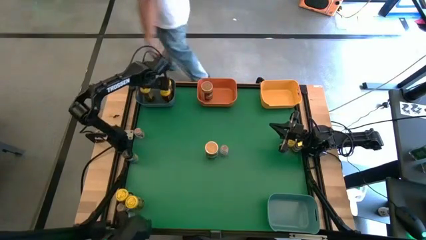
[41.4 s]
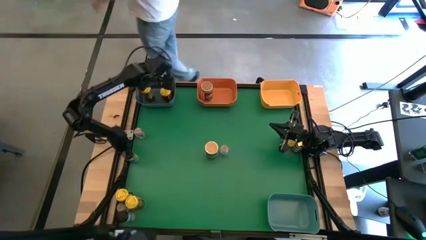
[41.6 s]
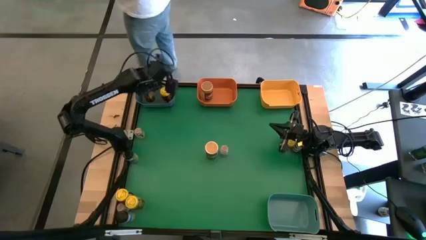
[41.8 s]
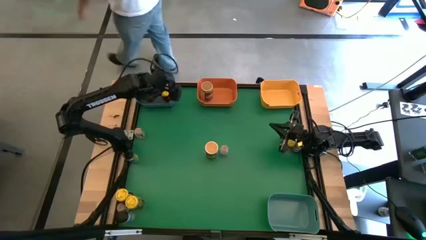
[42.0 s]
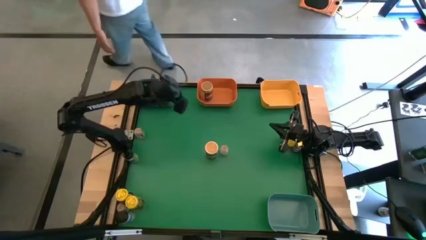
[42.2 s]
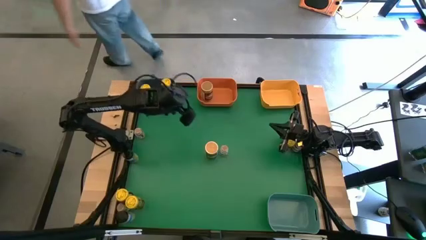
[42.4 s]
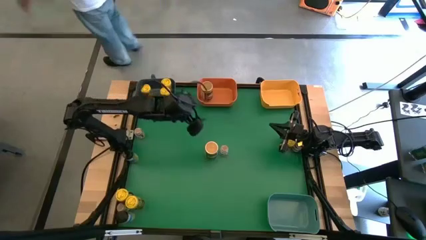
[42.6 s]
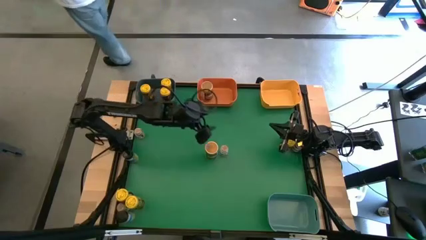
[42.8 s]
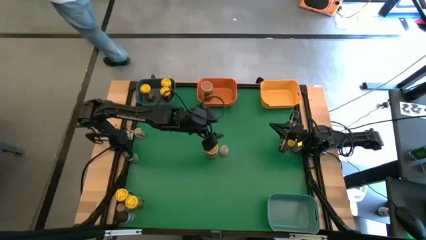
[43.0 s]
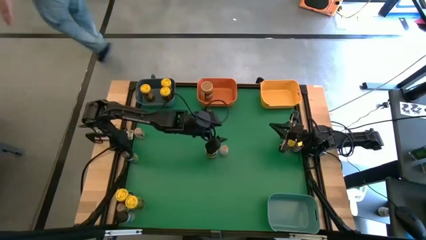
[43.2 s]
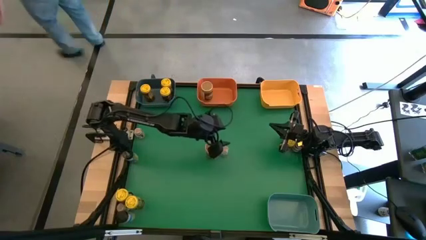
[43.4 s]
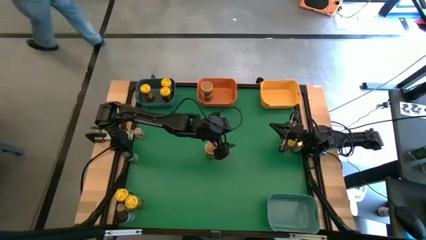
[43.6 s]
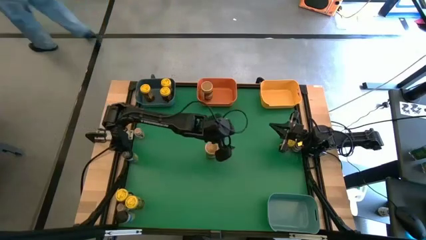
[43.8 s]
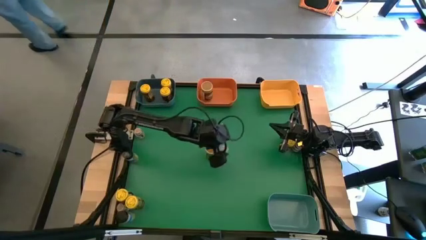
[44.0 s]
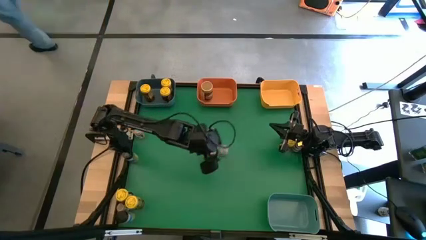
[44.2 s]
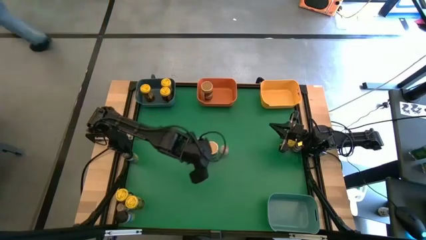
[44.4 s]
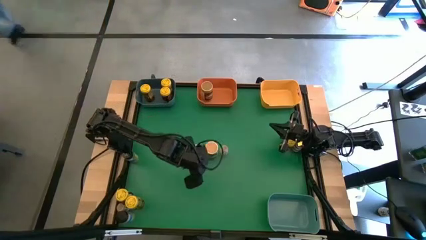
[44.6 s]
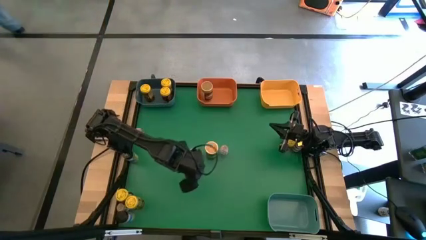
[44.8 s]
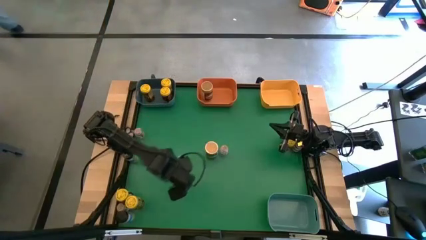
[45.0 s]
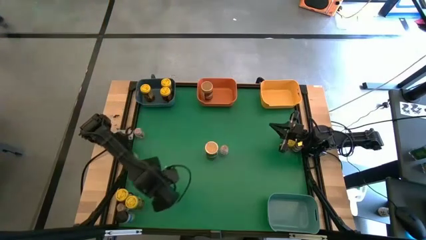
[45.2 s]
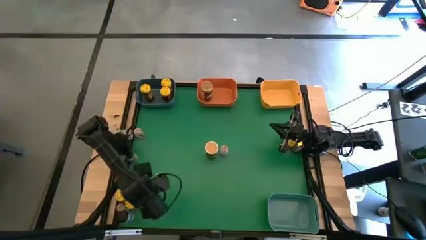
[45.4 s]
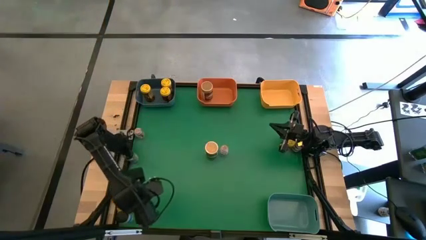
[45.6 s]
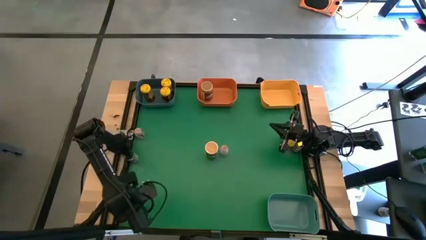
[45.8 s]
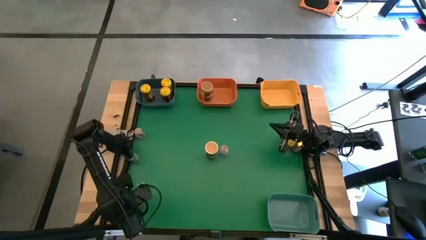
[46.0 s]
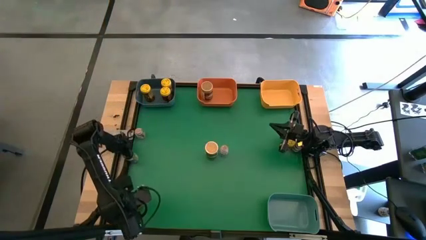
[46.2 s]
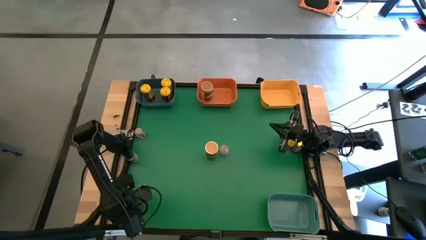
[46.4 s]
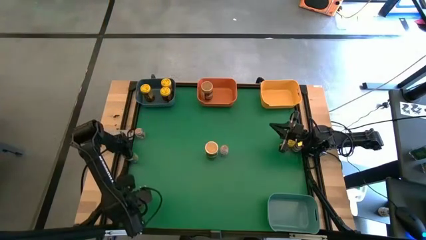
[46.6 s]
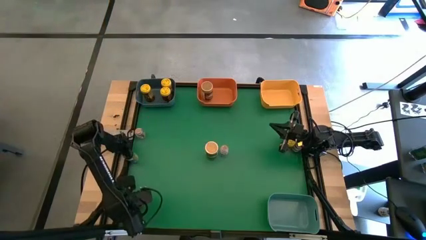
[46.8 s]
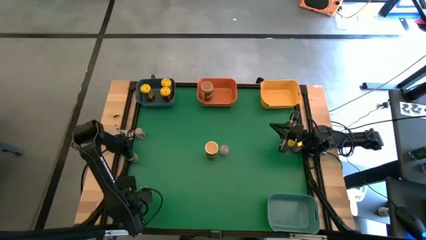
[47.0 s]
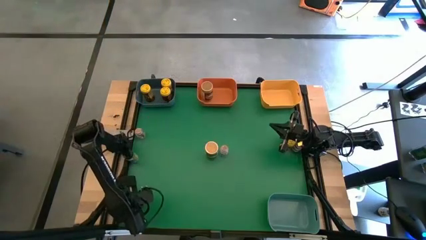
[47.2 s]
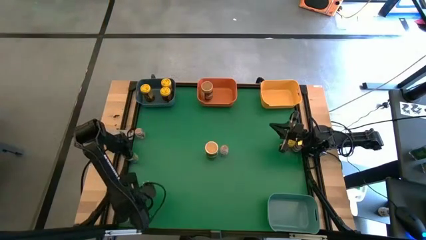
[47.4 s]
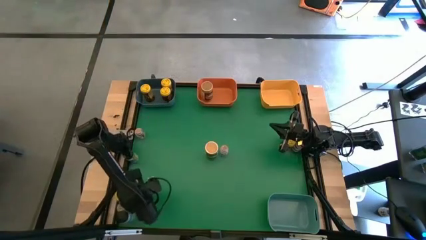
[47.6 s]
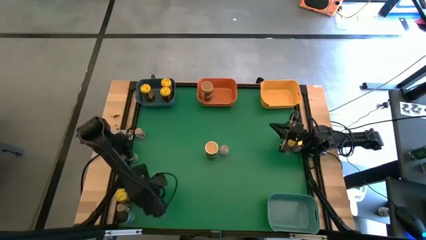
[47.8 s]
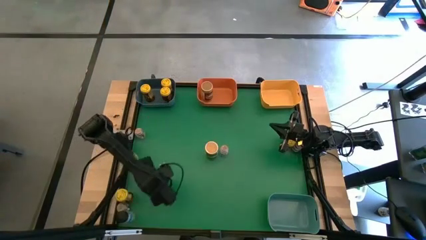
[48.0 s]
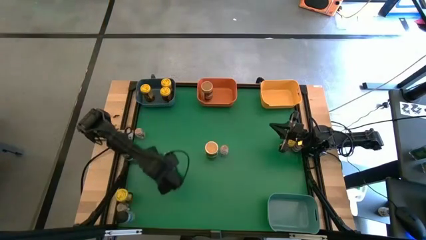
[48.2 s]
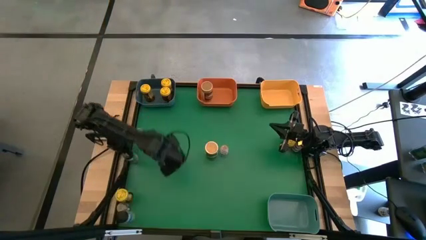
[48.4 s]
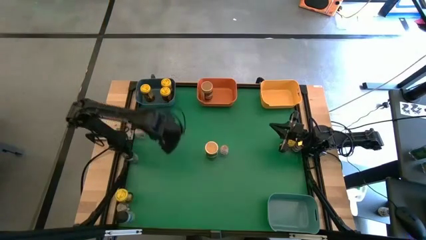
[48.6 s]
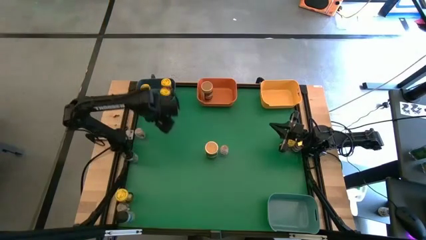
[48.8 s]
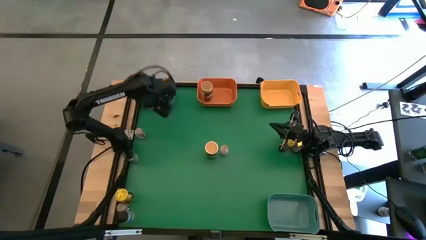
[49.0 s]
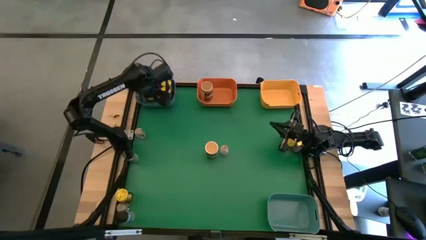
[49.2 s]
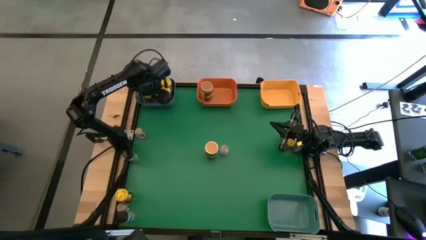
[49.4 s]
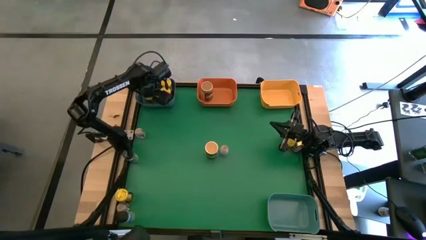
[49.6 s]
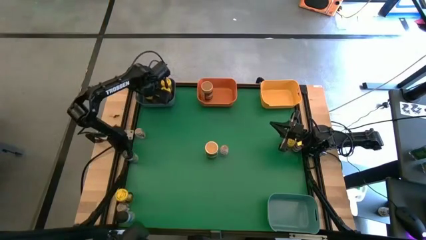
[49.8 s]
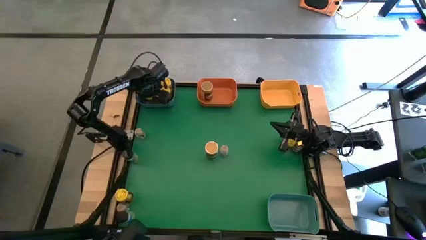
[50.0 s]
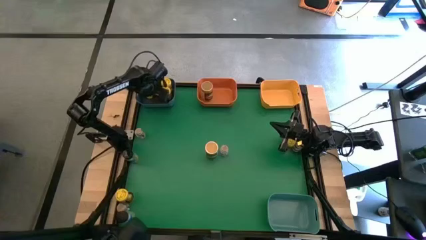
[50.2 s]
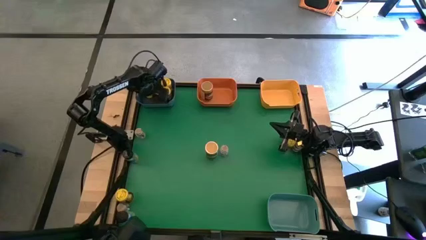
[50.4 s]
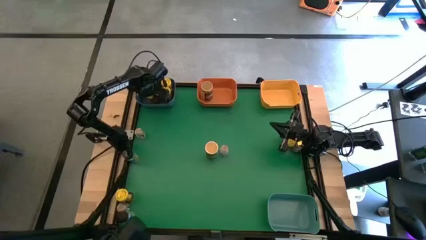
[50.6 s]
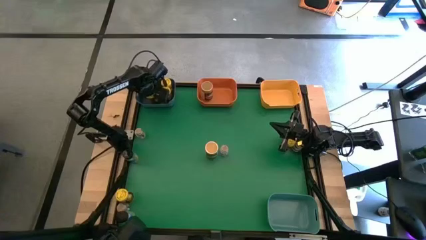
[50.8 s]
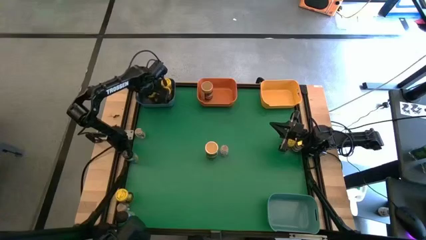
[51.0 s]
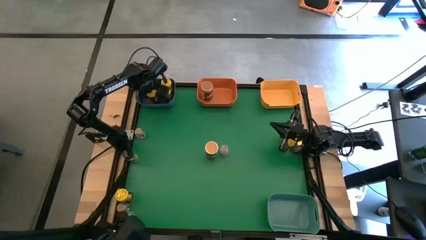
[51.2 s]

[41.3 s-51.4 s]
Task: Sort spices by type
Put the yellow seasoning bottle into the blue bin

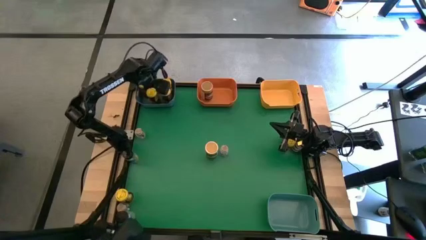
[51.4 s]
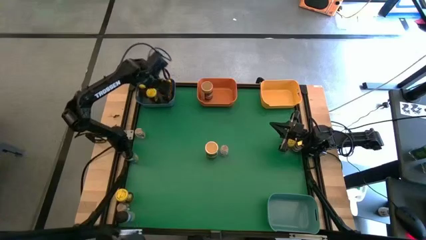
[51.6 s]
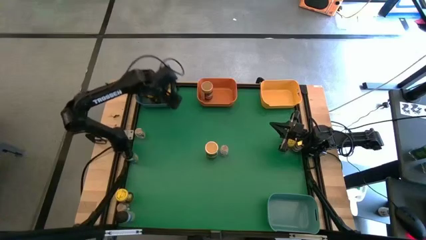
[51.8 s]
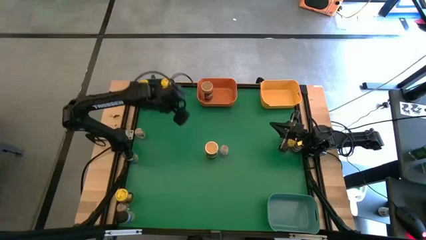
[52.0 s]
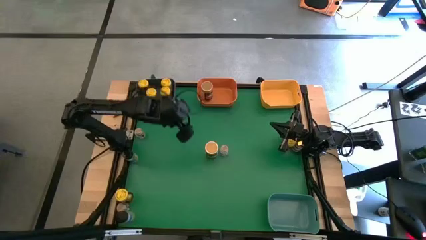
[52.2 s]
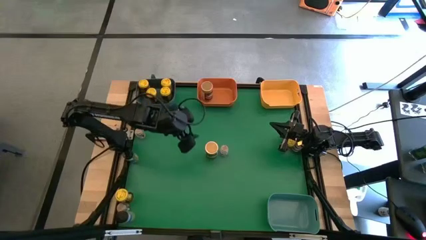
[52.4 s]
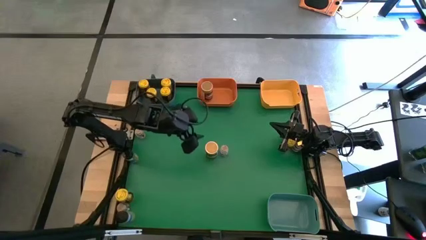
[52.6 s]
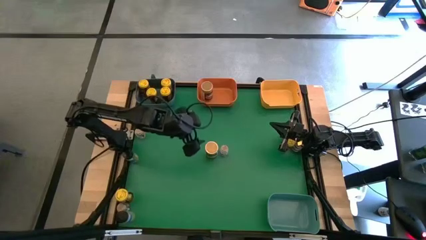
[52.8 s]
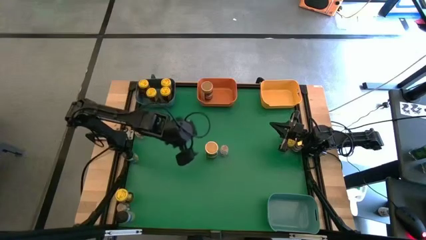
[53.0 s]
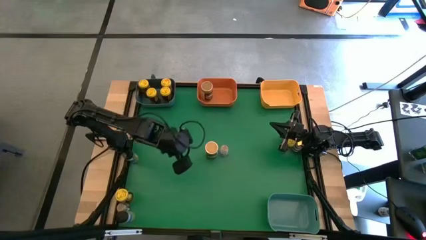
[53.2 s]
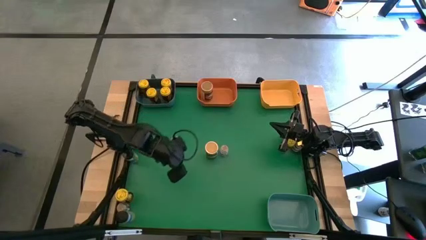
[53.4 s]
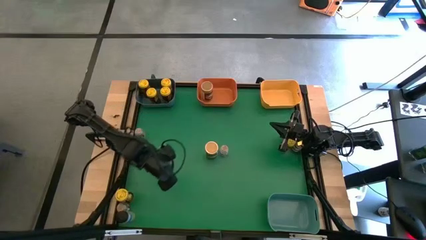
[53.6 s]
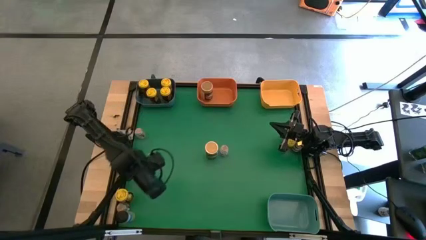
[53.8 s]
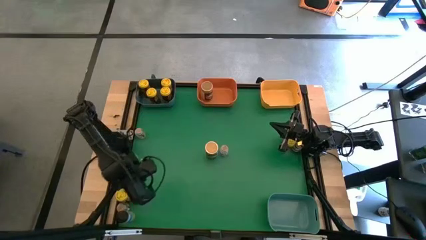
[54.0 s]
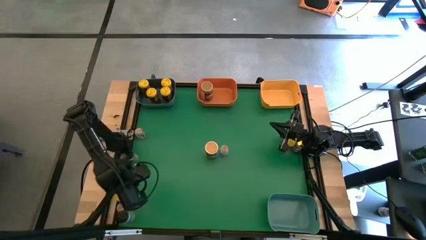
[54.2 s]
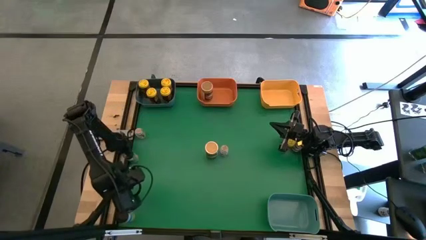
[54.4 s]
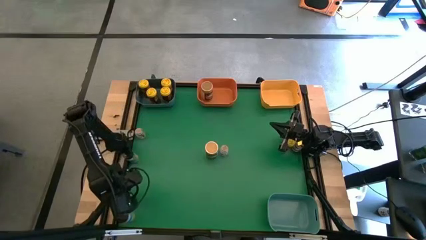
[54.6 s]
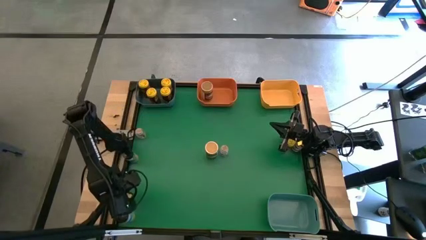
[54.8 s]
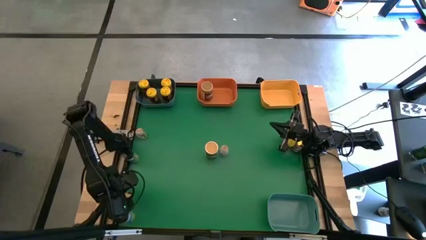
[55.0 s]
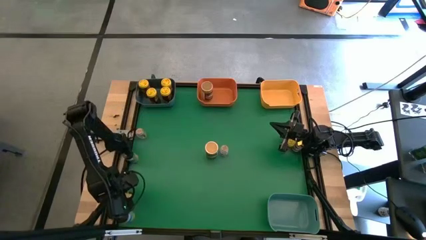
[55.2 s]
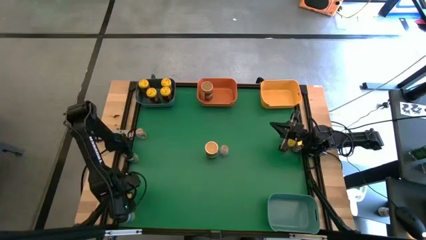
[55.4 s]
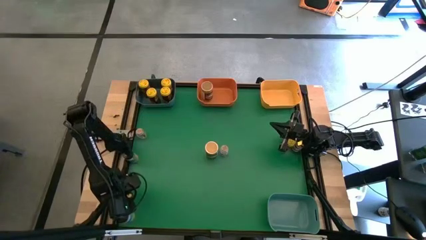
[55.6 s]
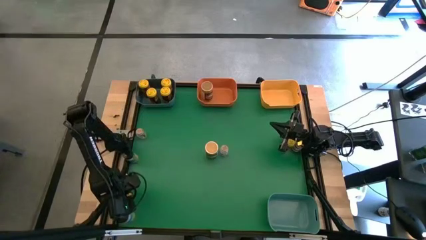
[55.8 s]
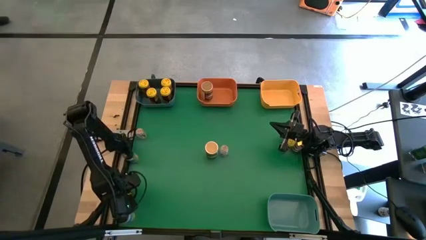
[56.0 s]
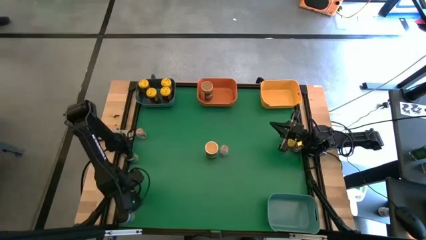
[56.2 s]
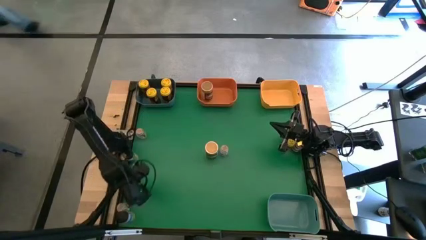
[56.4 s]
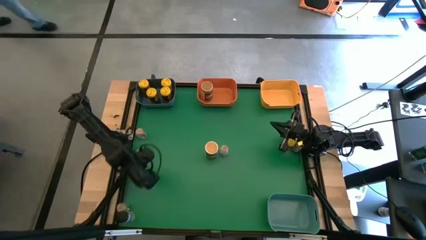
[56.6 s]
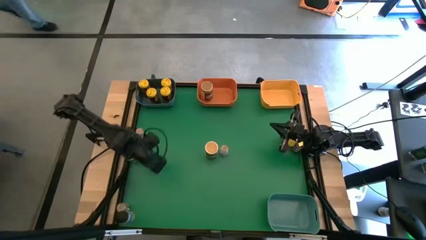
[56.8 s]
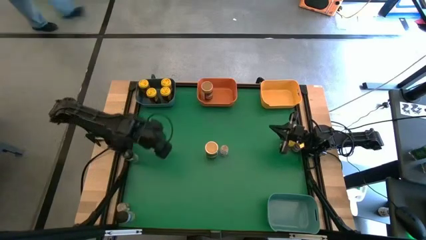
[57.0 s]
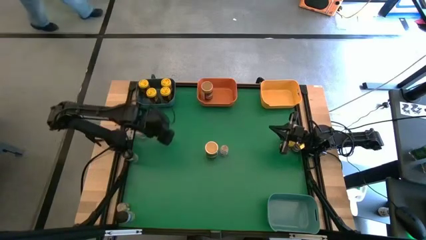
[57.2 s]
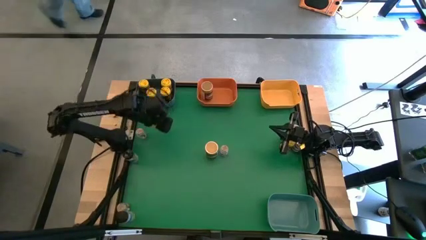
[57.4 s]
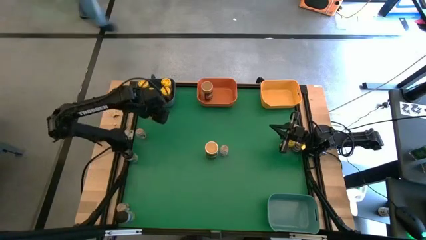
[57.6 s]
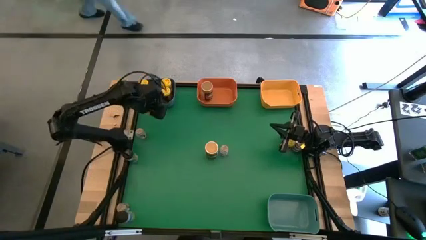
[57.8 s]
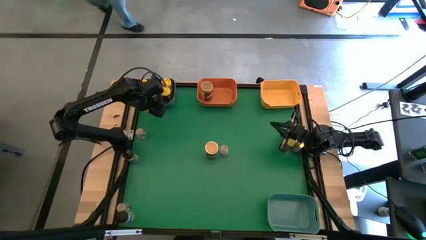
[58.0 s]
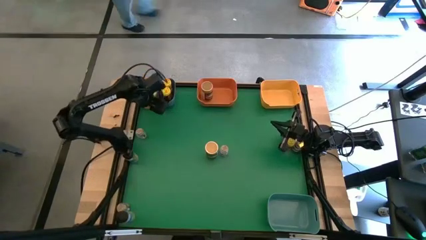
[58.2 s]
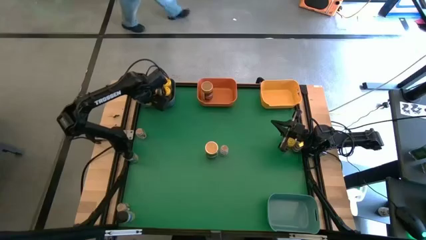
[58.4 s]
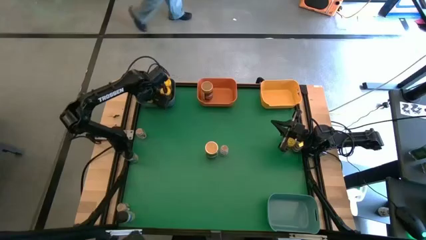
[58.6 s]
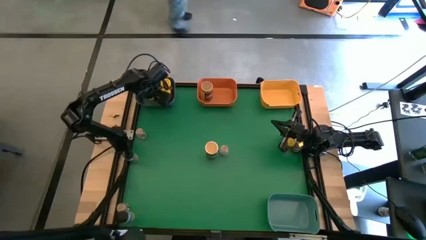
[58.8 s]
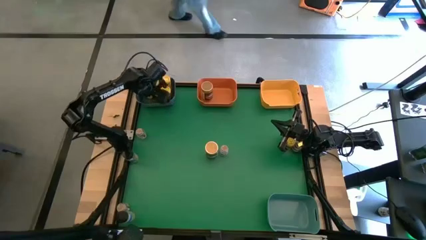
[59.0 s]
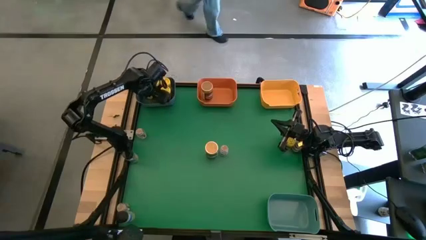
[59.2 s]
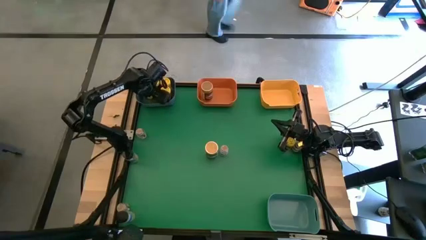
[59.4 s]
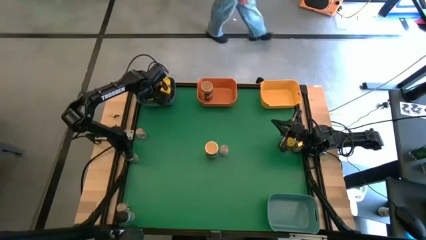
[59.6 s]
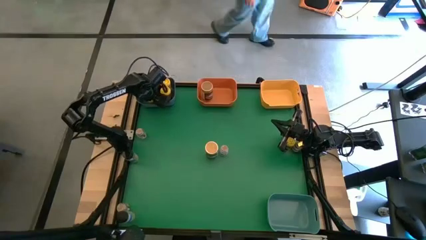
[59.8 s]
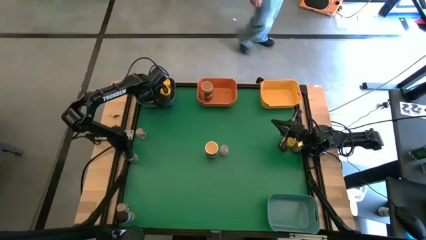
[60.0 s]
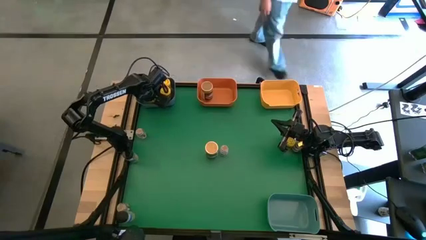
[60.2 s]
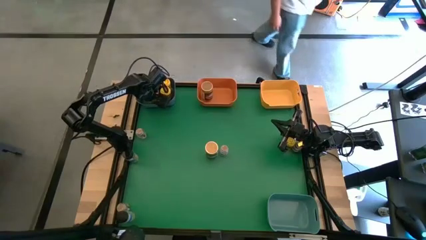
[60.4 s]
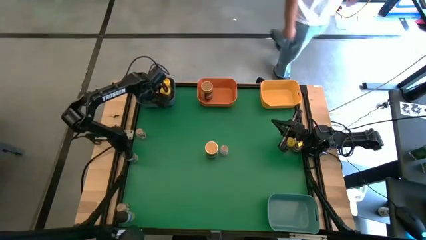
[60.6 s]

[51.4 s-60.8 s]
Put the yellow seasoning bottle into the blue bin
